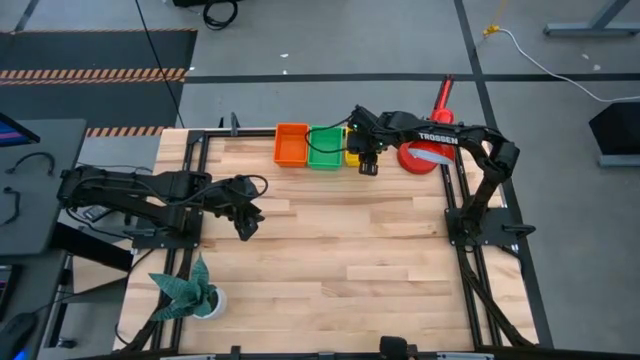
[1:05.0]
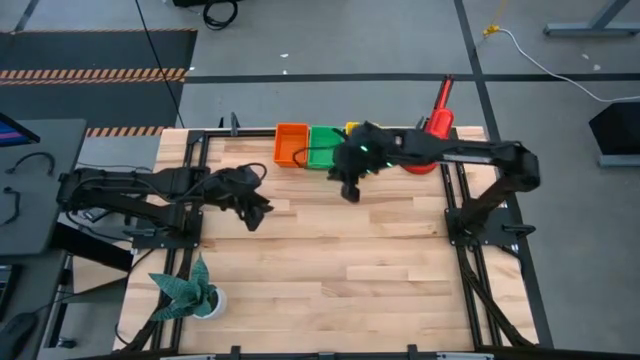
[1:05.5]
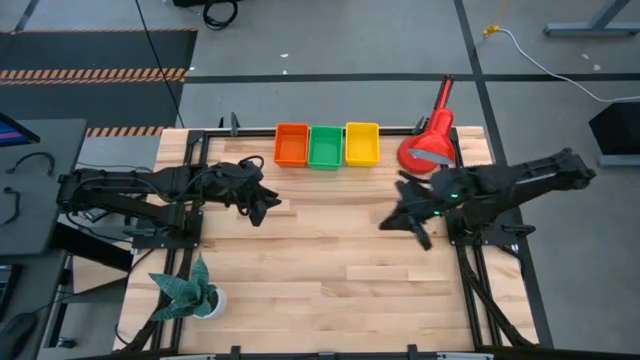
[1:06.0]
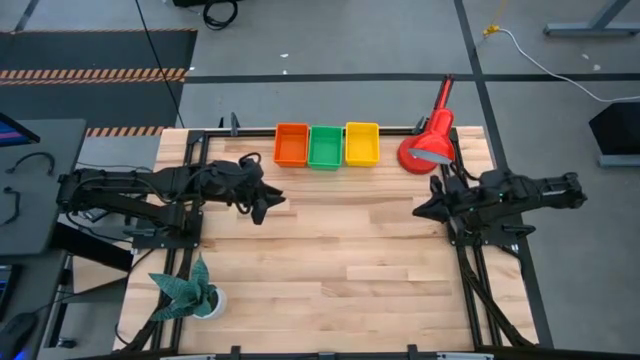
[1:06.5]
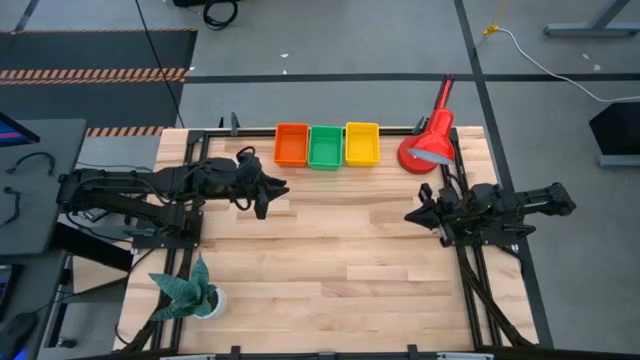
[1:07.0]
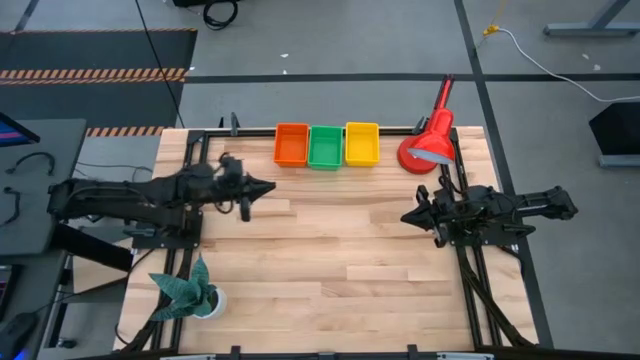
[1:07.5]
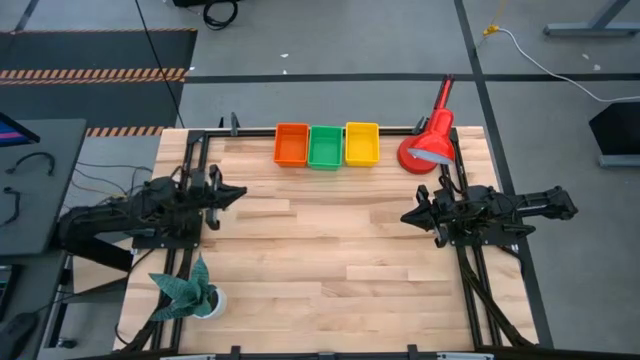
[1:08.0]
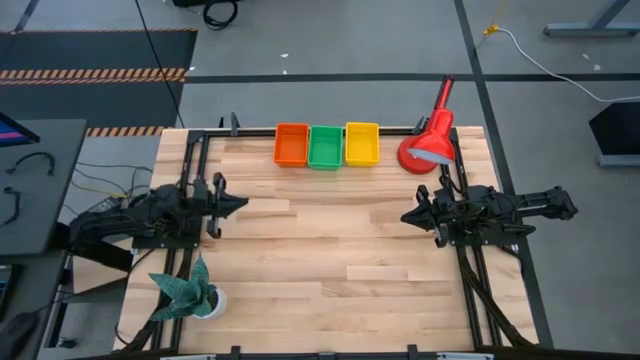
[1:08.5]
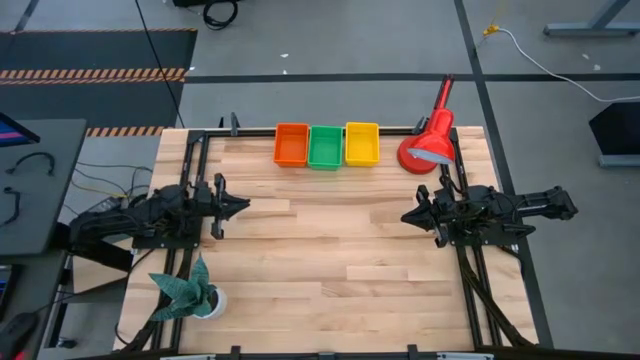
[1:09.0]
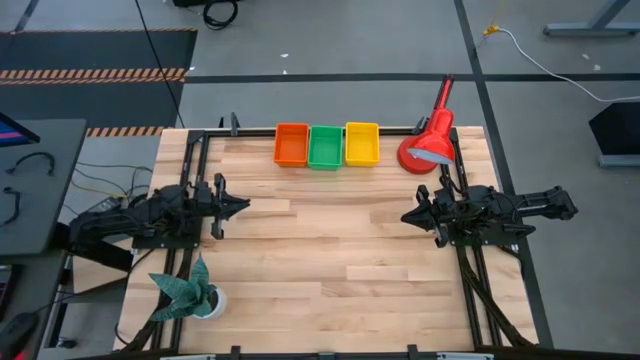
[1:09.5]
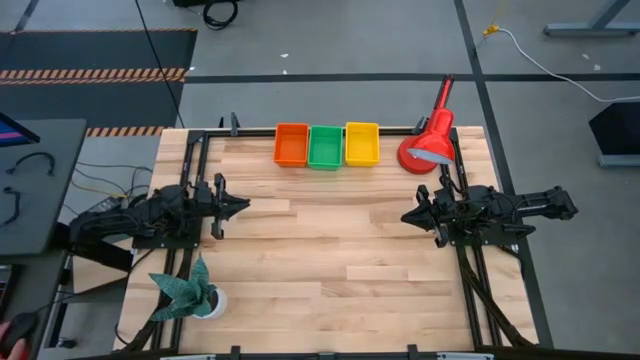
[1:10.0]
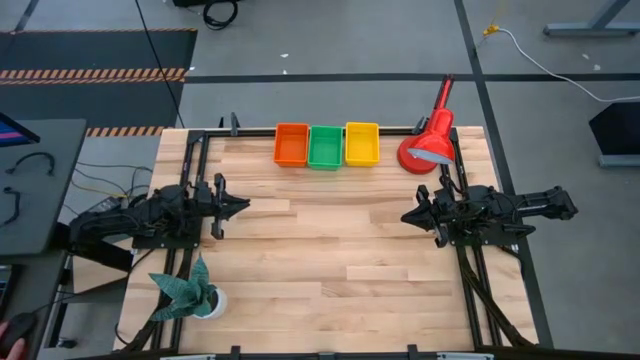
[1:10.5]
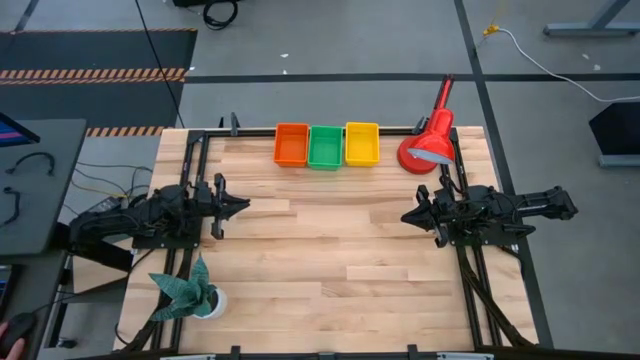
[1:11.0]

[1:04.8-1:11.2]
Return to Home Position

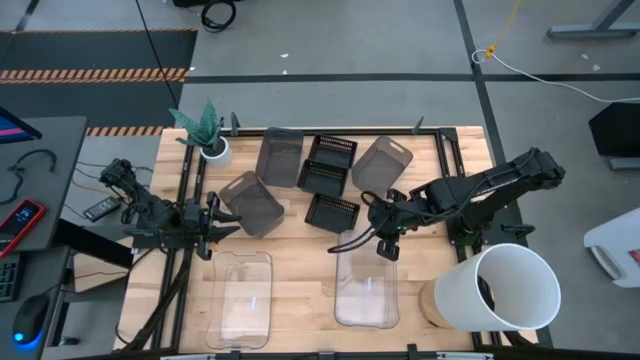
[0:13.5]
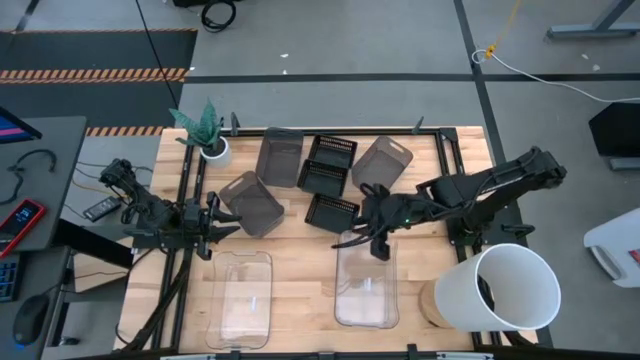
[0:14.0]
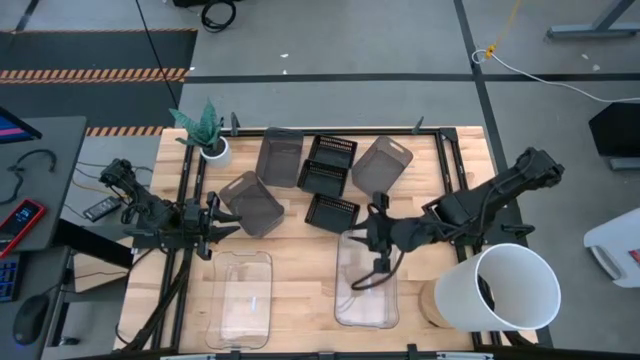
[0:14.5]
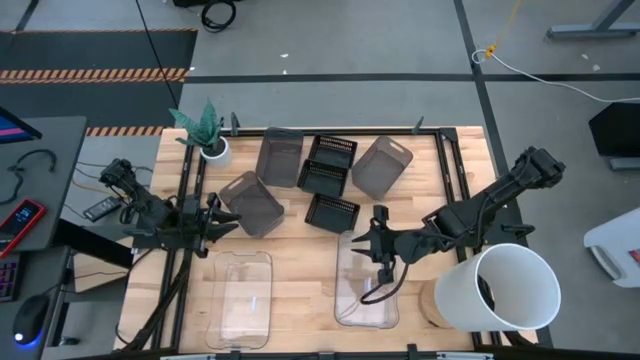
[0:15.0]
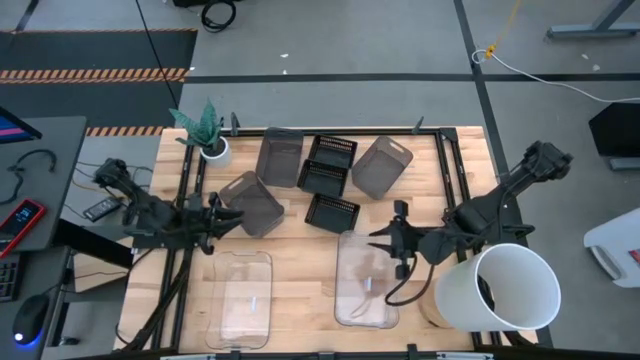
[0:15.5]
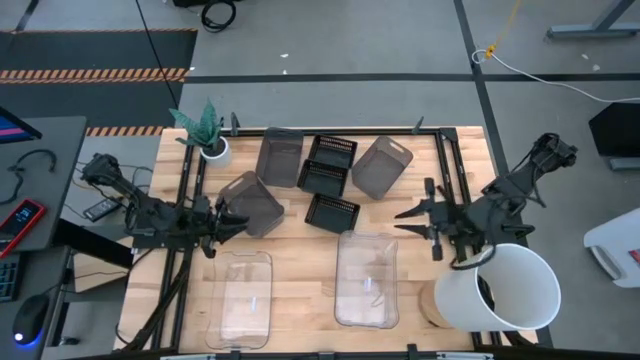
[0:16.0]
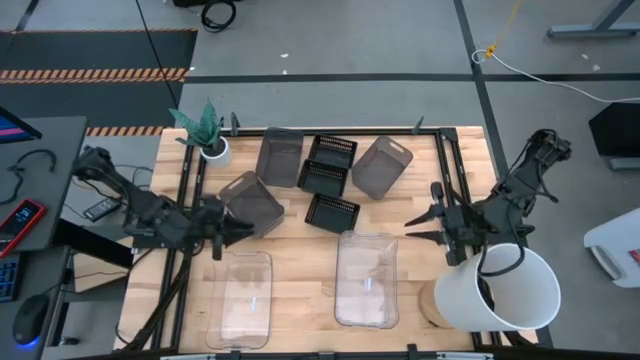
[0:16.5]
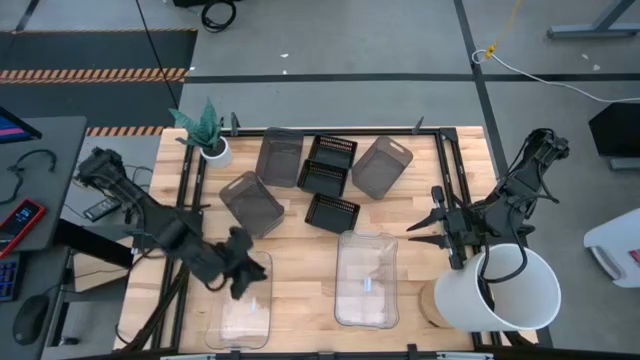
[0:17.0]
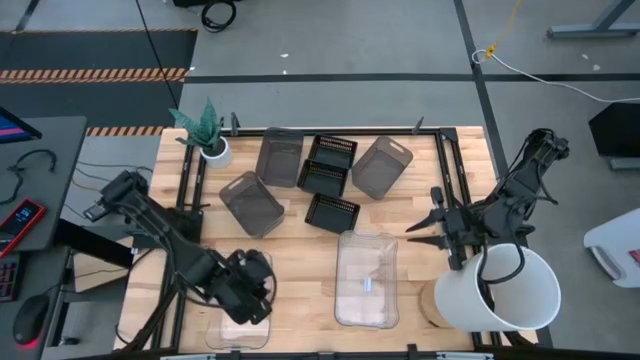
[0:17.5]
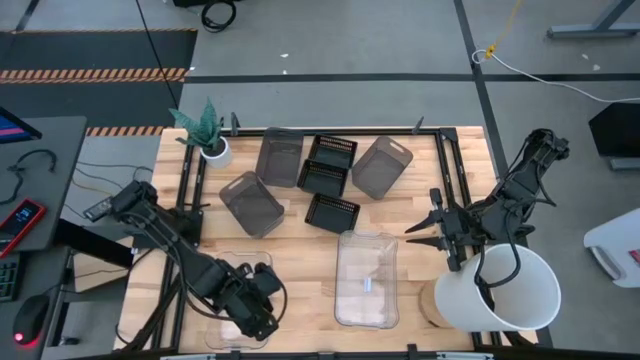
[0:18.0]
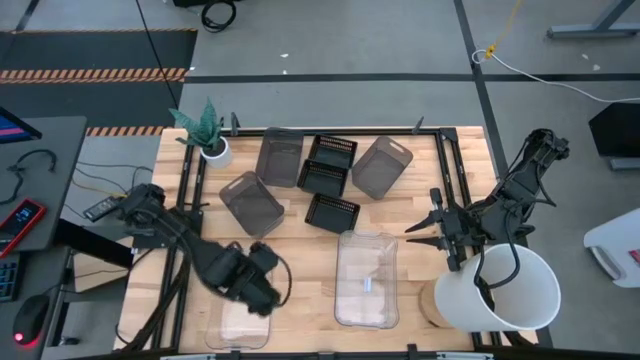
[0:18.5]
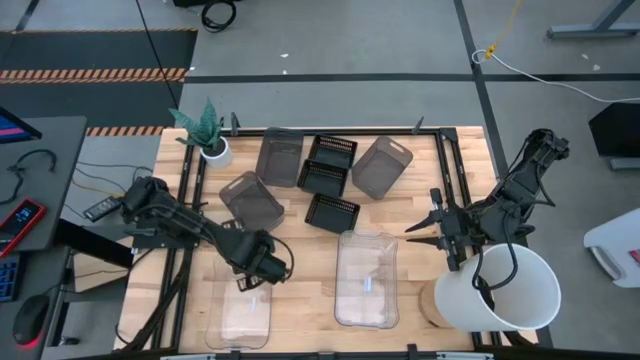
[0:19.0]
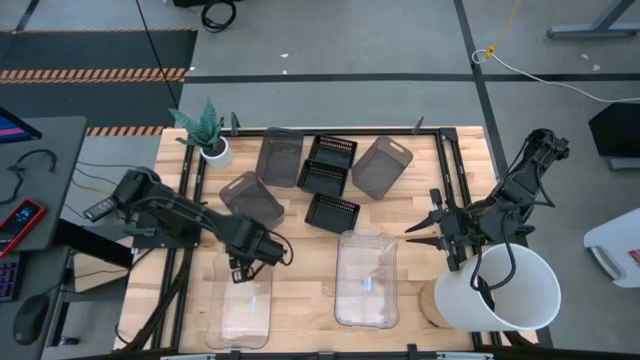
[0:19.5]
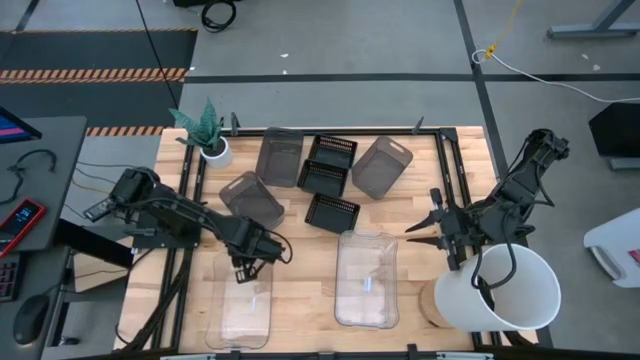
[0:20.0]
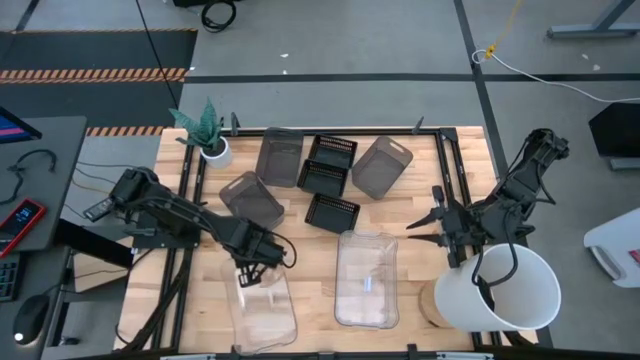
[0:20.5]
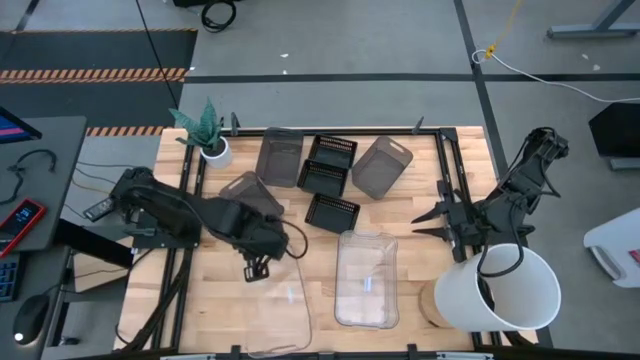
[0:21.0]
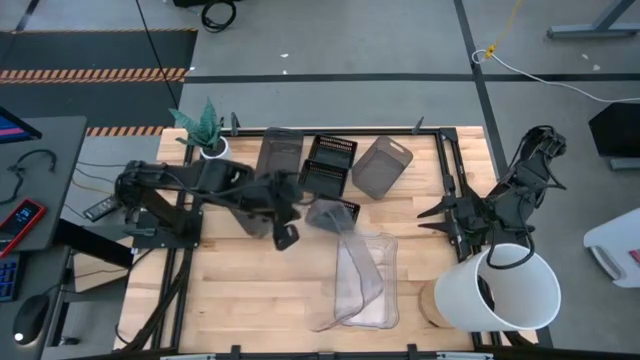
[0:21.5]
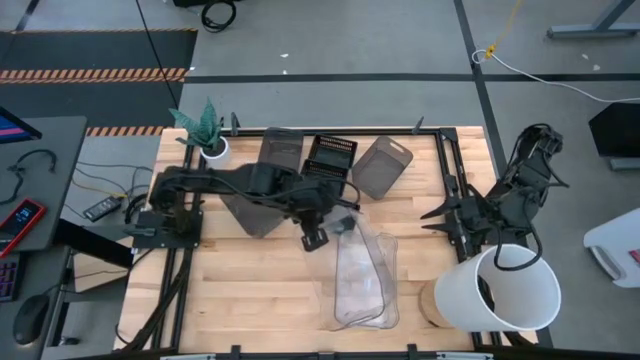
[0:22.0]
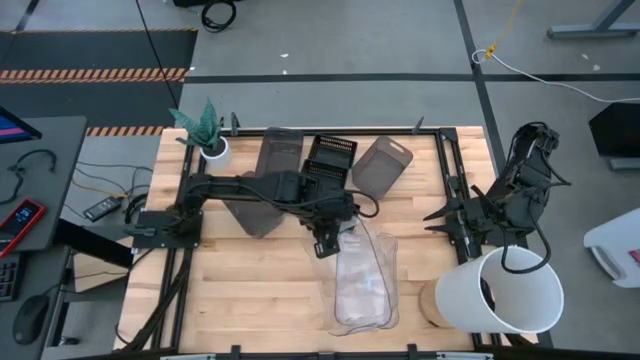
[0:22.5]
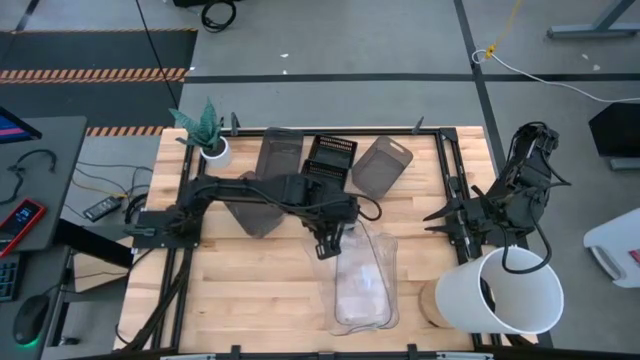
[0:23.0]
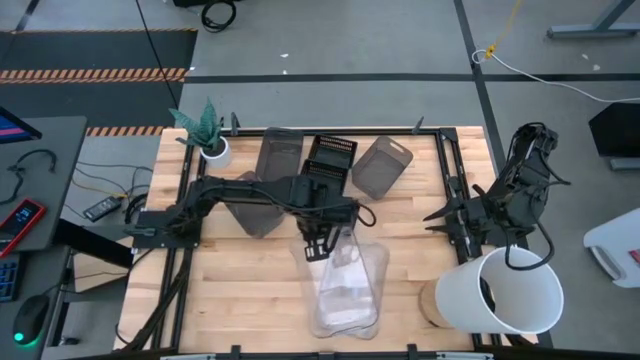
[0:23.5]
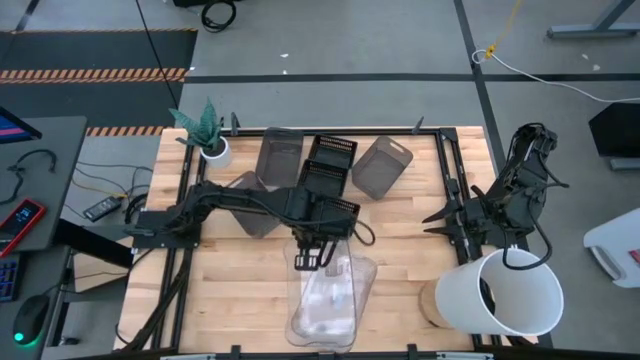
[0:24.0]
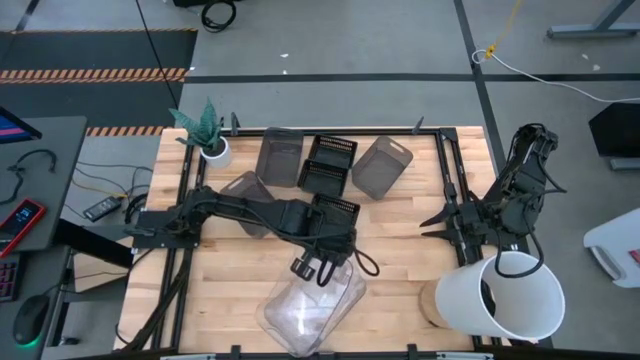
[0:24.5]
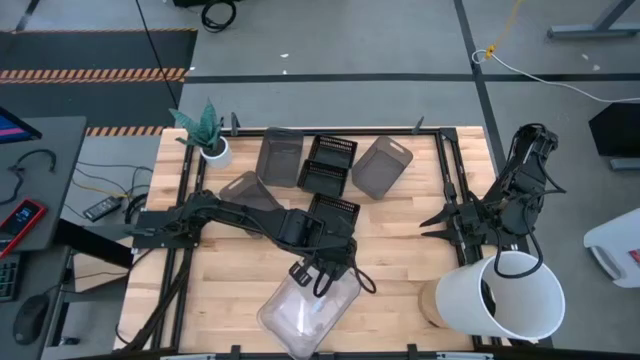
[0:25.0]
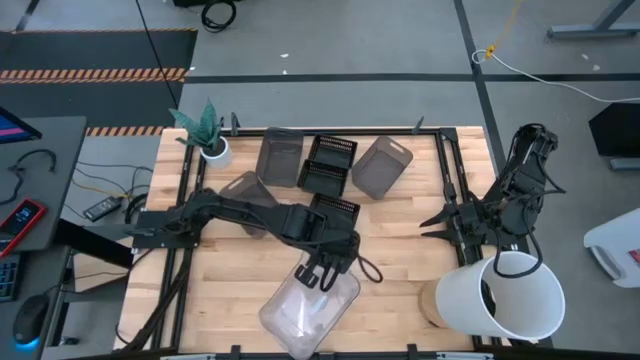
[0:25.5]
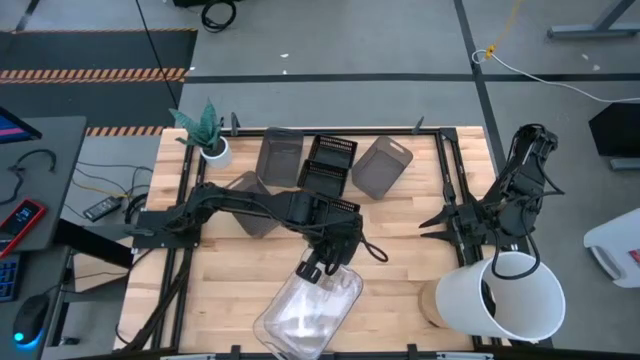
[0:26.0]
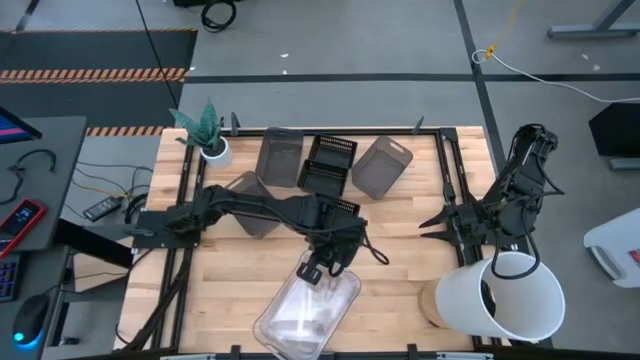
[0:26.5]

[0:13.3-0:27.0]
Stack the left transparent bin on top of the right transparent bin
